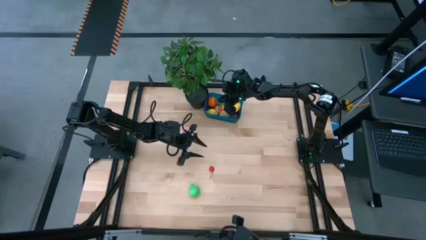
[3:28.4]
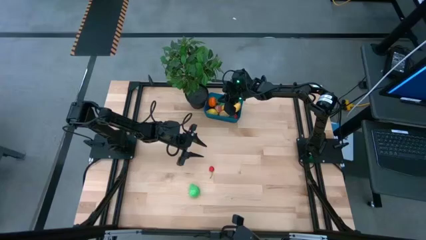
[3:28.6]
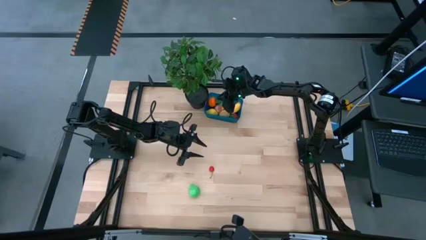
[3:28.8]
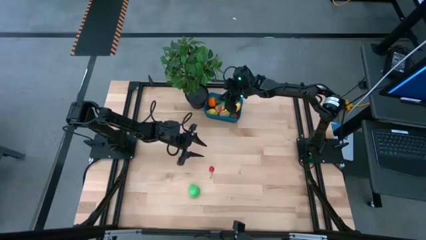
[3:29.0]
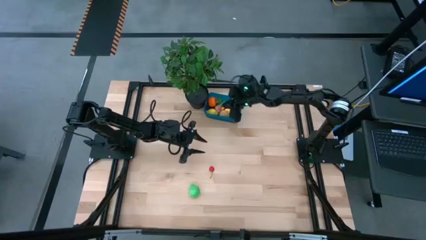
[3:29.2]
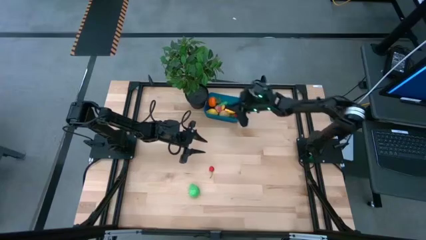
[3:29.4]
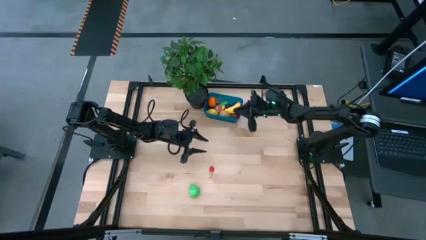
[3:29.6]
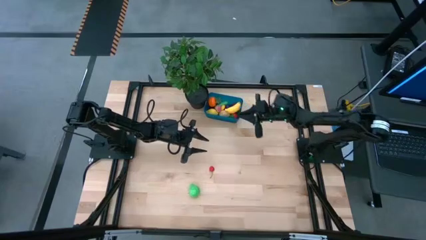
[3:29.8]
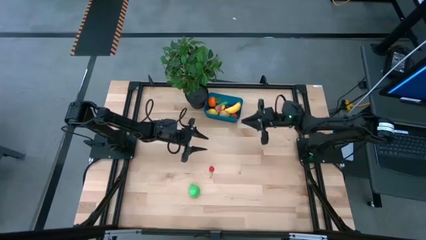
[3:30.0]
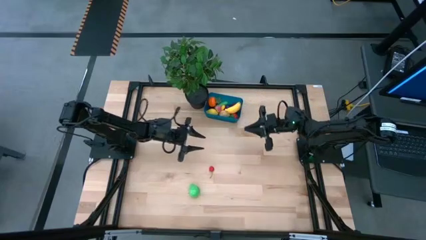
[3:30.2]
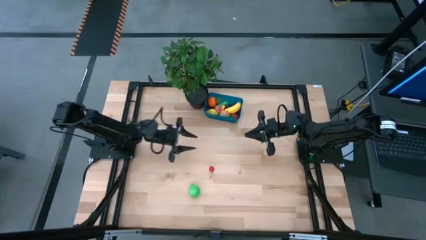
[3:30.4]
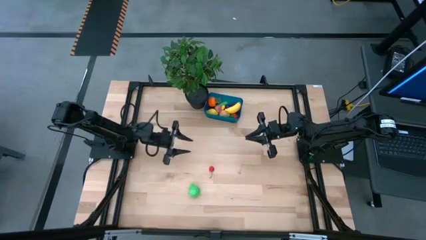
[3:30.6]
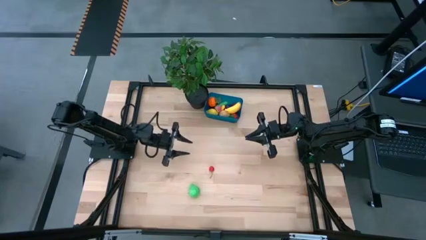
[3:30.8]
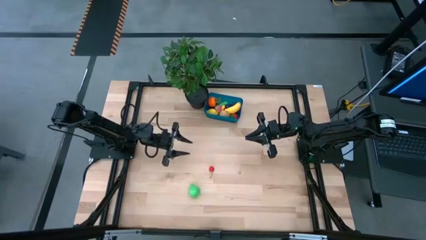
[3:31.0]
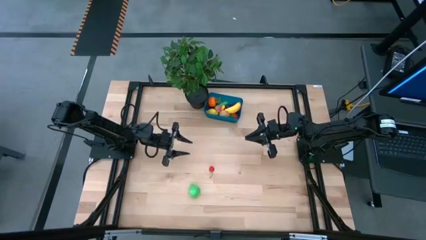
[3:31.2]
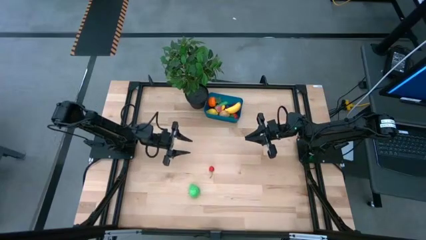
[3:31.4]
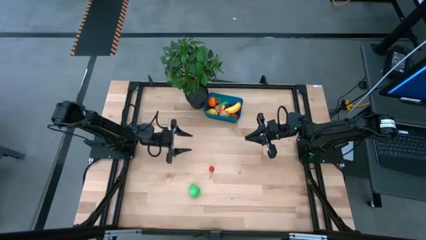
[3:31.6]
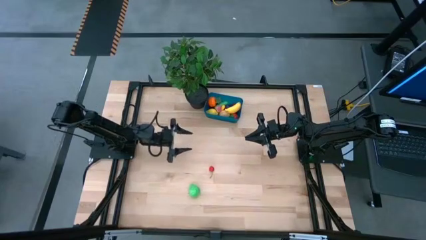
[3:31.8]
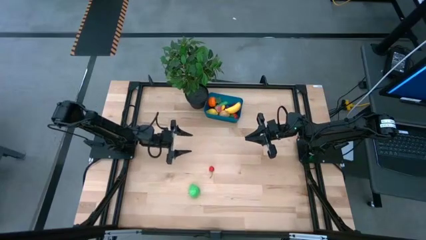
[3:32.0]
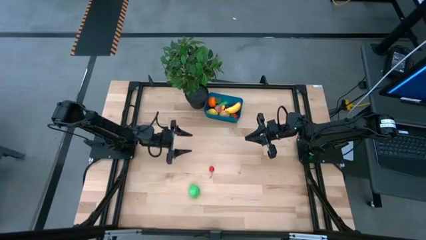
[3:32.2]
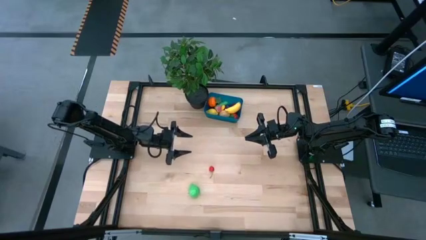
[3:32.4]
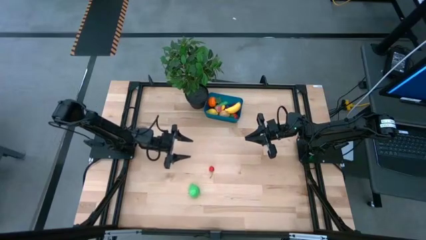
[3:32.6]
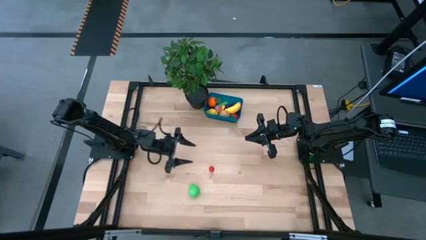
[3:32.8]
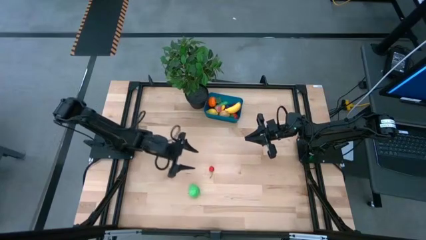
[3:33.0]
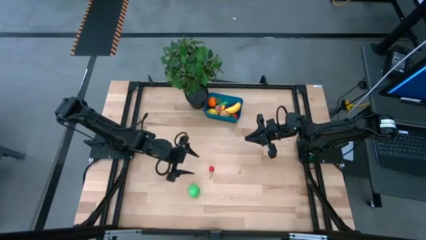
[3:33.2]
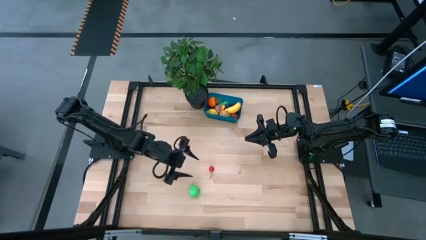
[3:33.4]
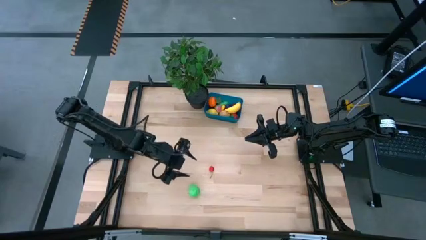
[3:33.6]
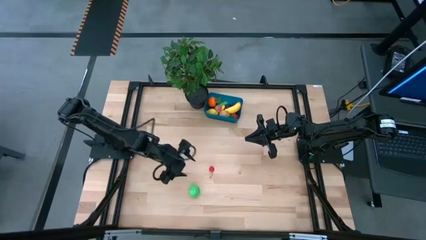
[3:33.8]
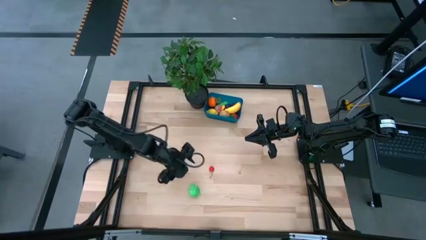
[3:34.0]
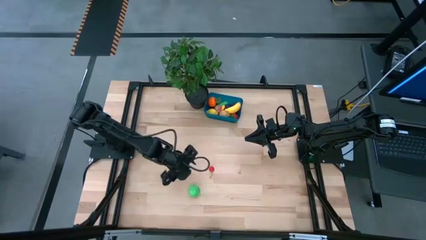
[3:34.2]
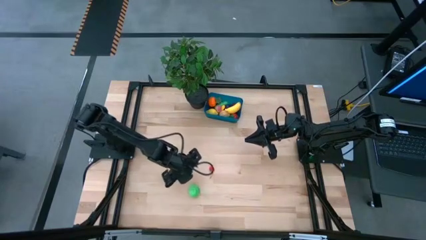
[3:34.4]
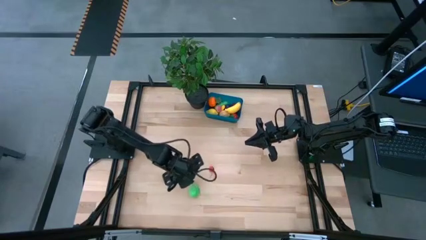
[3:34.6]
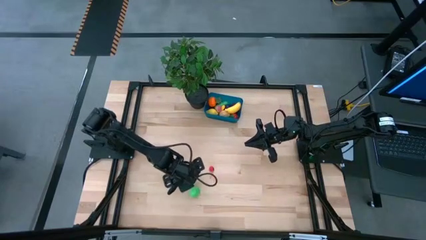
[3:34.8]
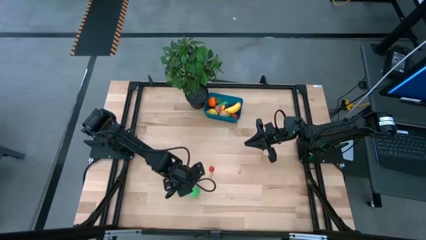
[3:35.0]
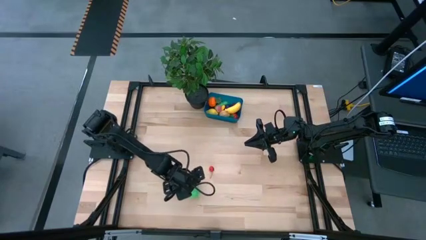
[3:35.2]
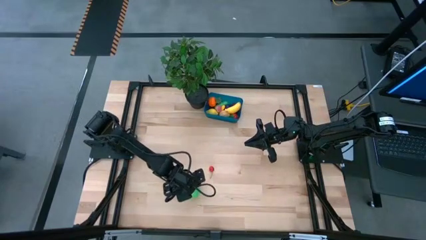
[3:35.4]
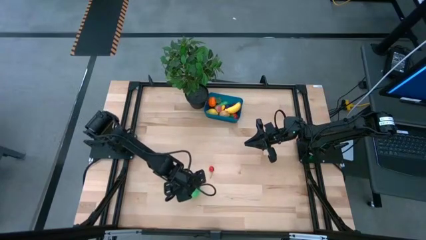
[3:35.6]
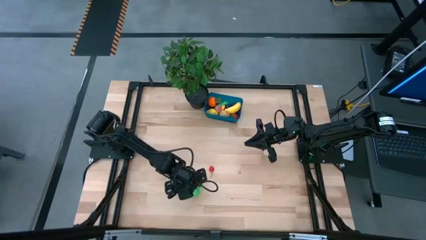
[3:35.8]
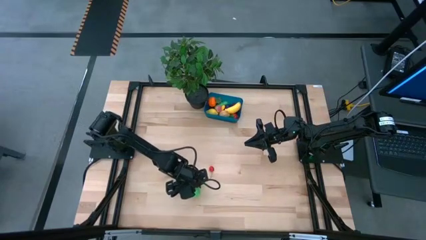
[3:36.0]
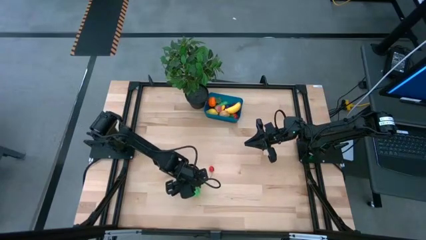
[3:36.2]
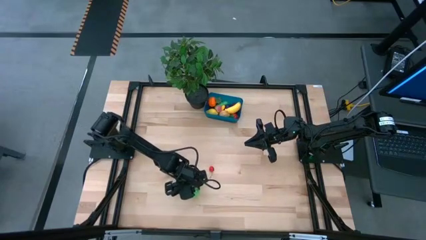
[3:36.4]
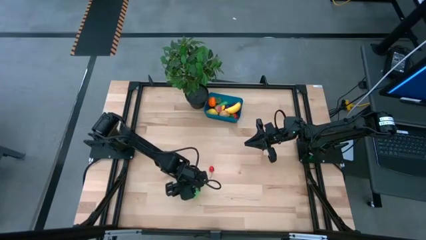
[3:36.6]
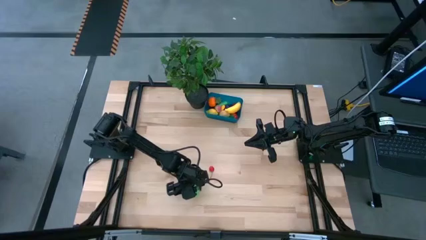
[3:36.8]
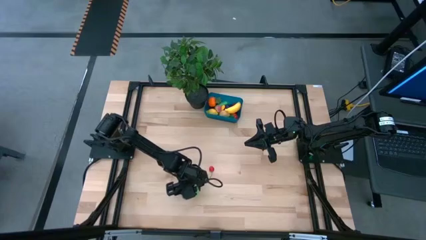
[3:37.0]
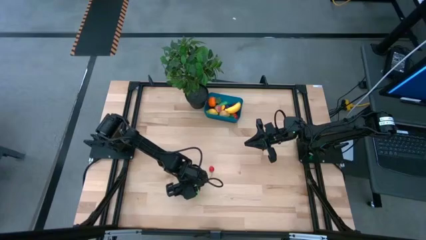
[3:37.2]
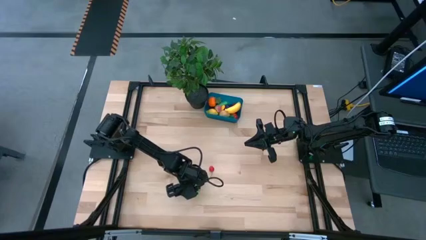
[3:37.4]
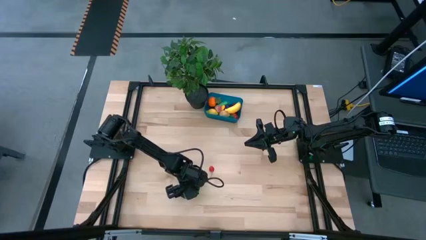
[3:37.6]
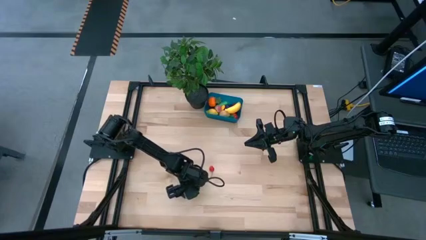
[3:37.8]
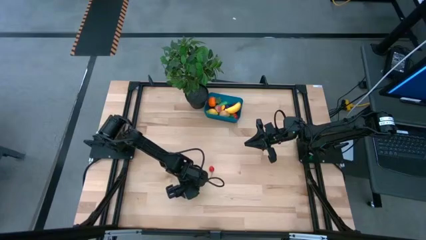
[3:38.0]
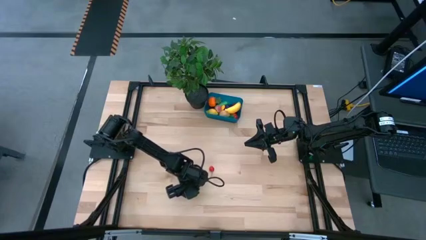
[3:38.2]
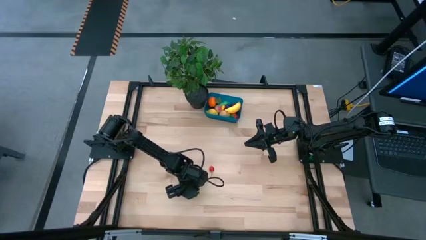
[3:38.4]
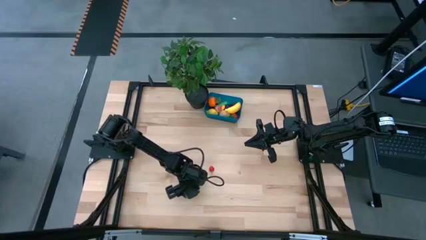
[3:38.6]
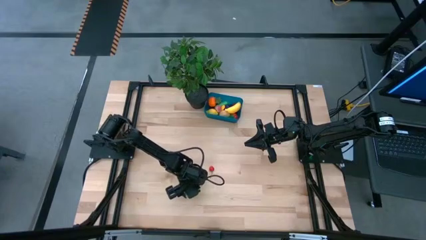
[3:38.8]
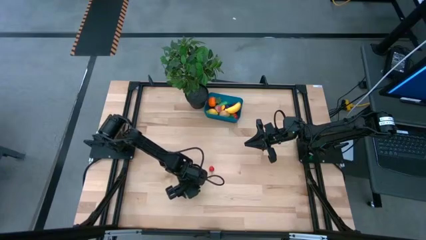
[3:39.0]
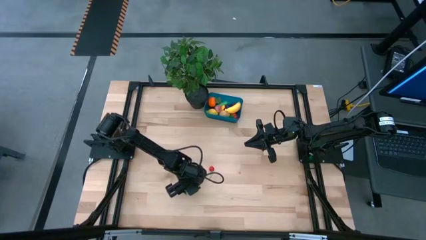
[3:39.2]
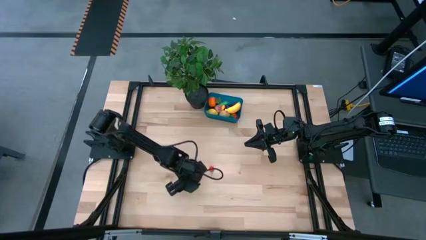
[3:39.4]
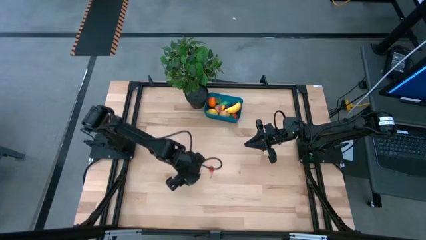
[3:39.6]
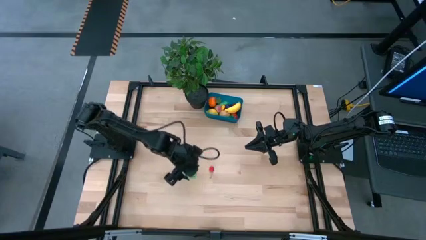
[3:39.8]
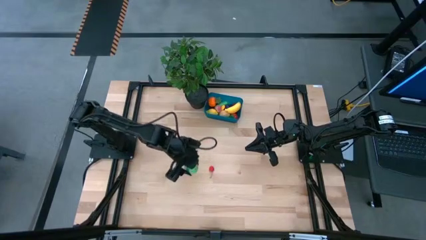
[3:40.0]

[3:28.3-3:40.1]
Task: Pick and placing Produce into tupperware
Put the green avocado into the blue container
